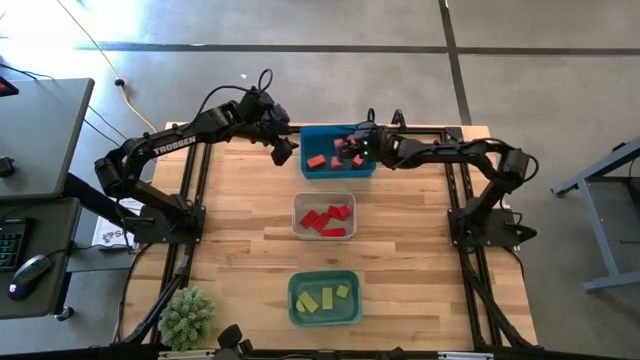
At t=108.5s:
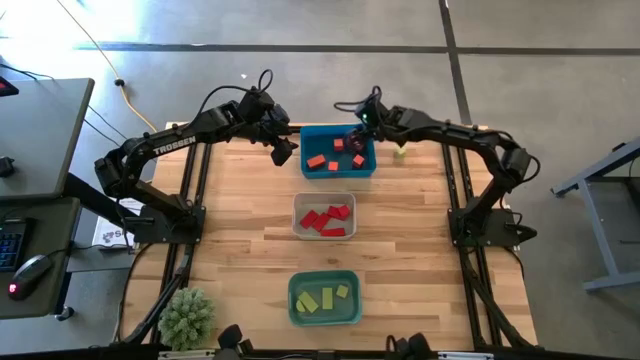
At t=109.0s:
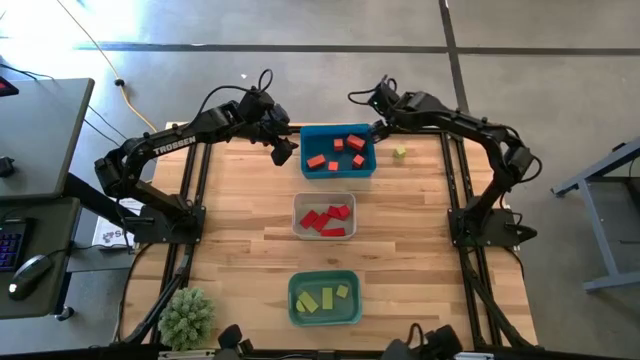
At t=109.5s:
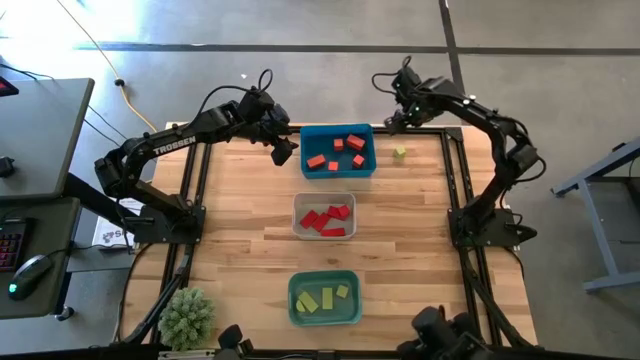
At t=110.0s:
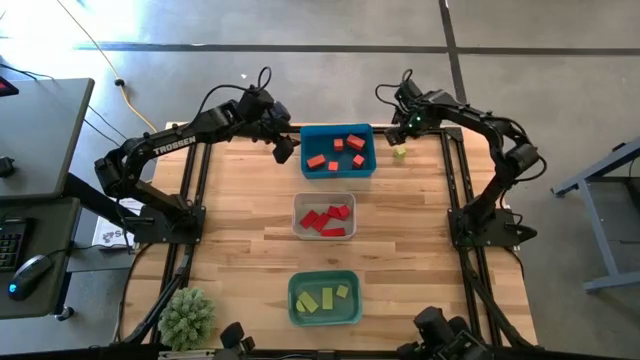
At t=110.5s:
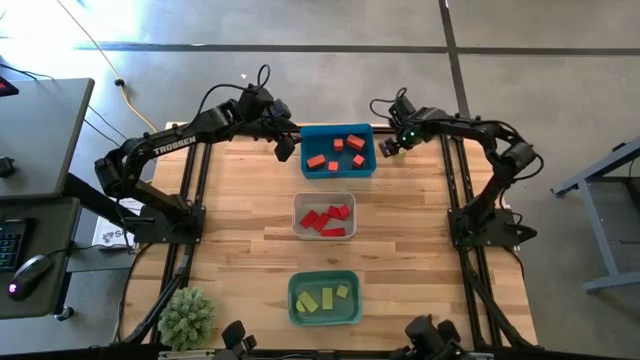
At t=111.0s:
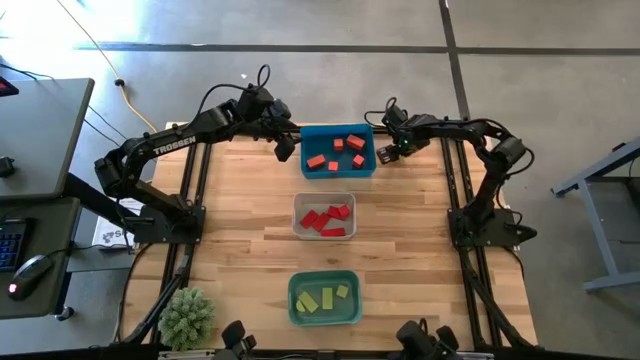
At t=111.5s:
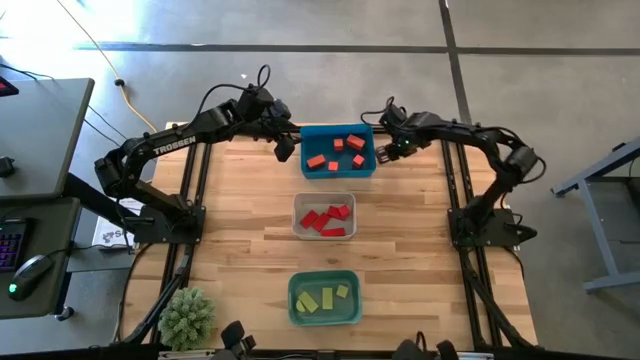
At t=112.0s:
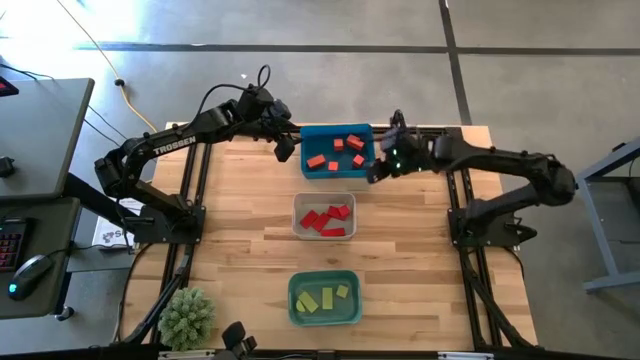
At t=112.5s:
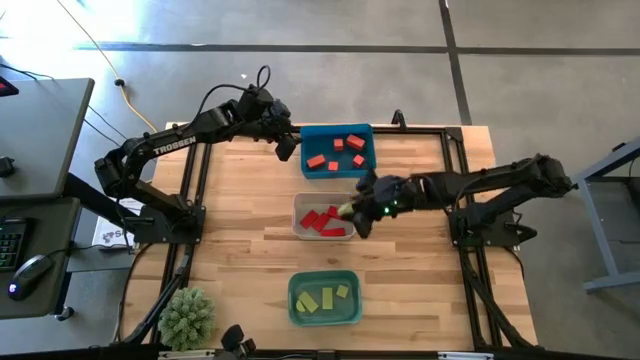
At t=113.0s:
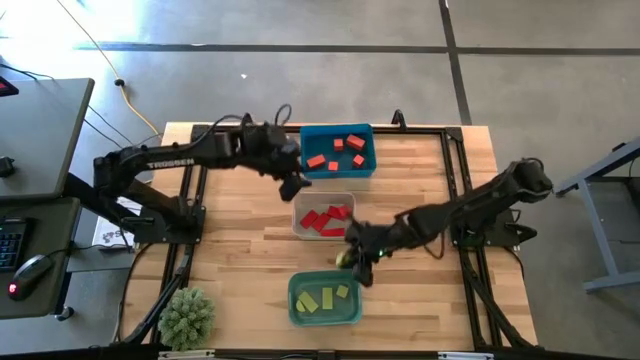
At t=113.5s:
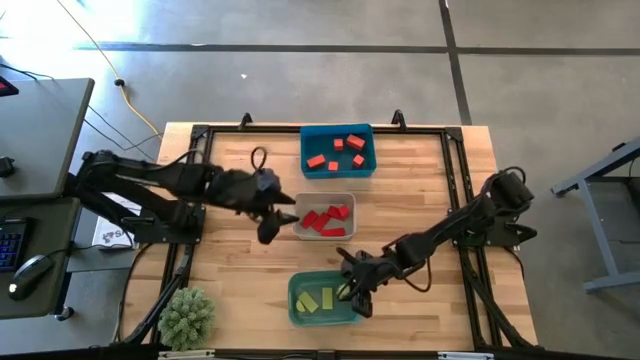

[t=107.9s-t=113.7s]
Task: Sort & place blocks by color
Put the light green block into the green bin

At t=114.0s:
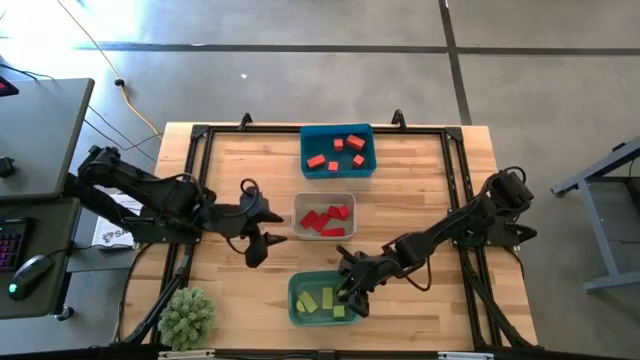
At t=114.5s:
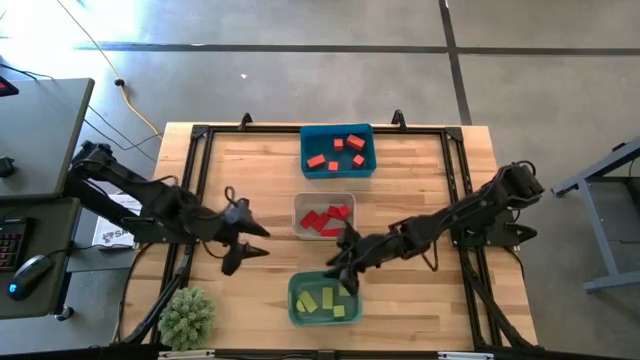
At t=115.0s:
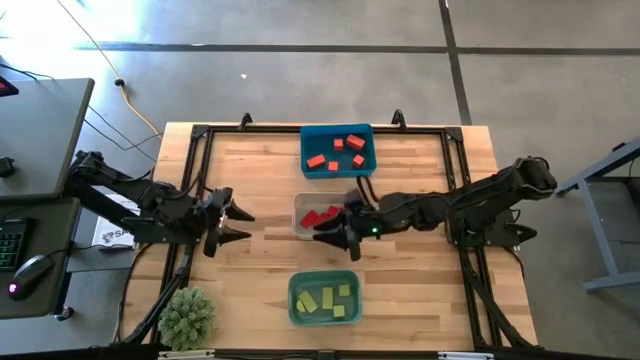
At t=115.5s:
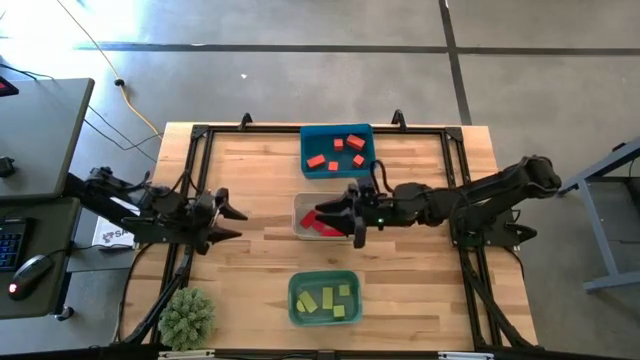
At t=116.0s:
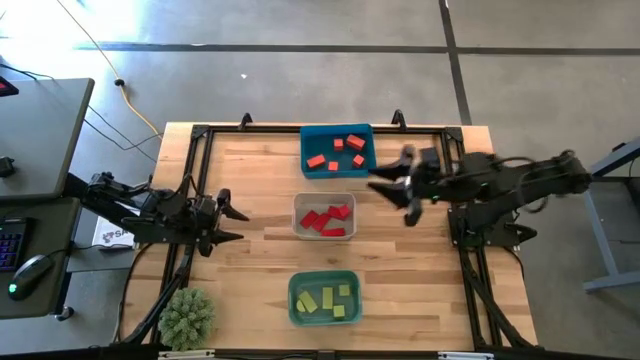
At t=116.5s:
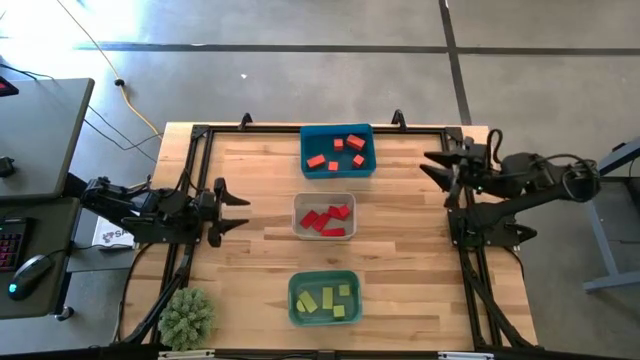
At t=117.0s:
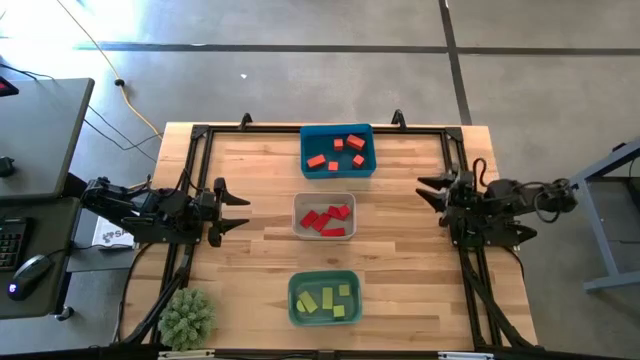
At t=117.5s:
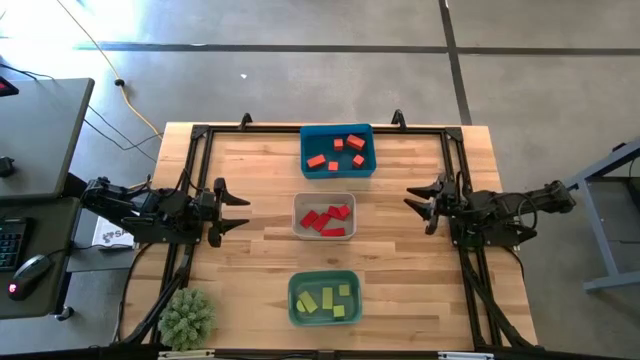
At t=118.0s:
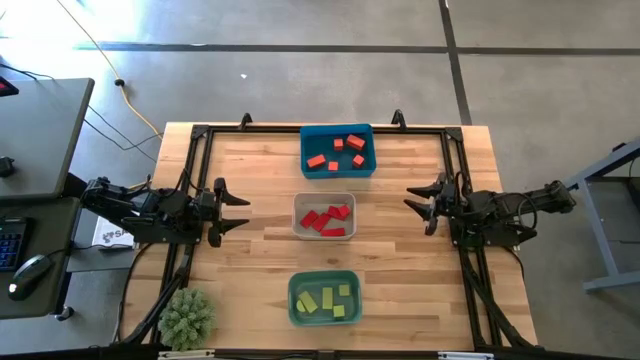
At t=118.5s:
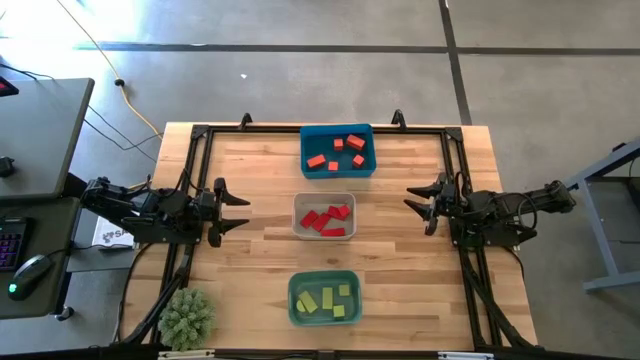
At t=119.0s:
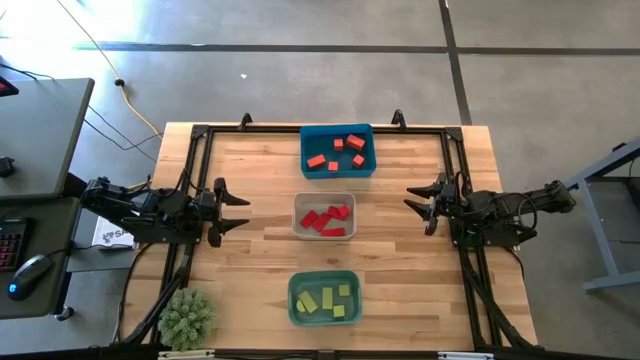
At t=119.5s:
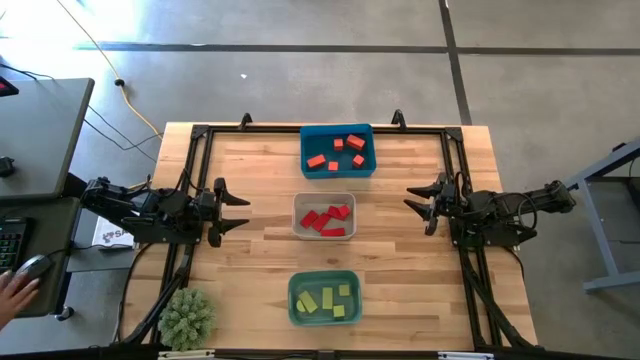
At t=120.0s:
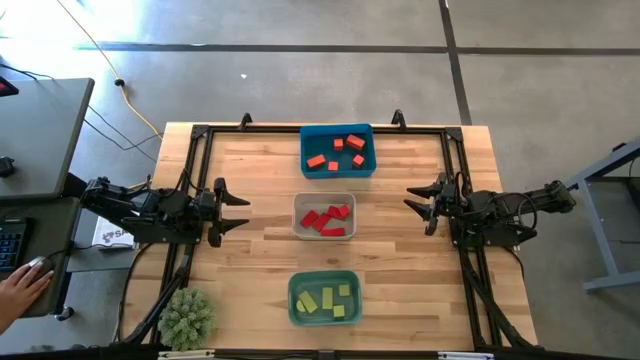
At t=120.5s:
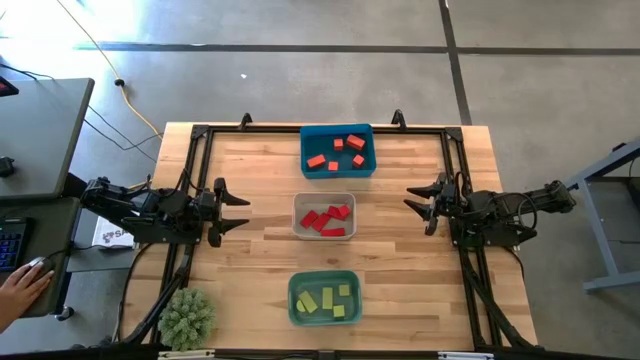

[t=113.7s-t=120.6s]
Return to Home Position

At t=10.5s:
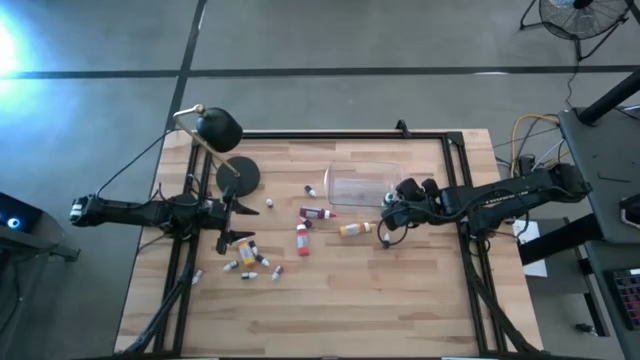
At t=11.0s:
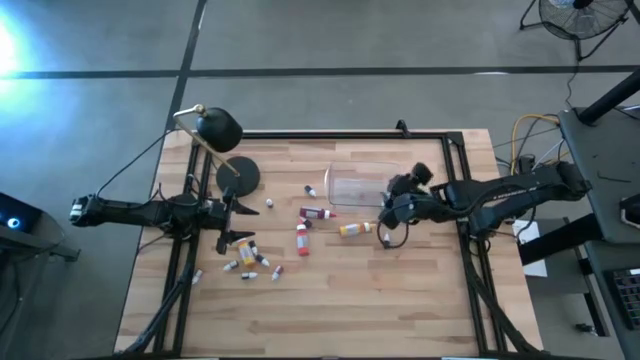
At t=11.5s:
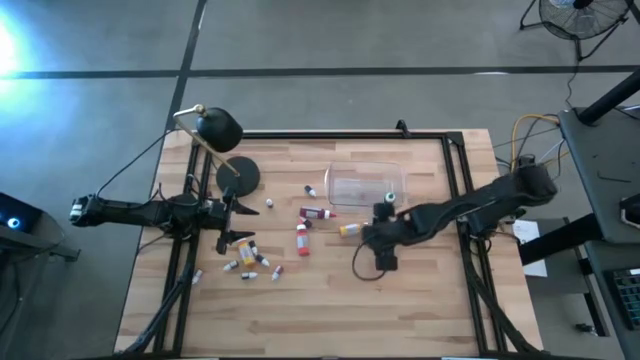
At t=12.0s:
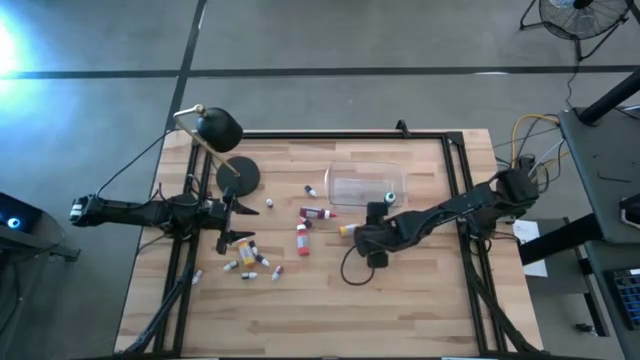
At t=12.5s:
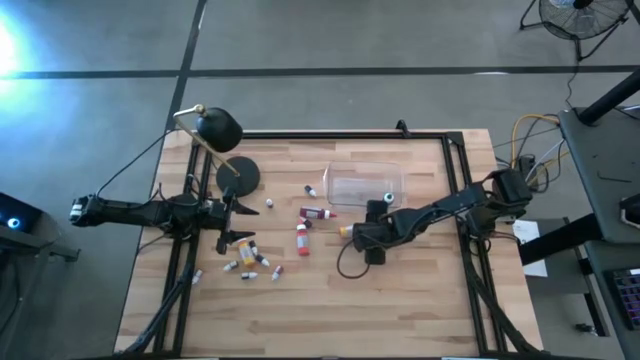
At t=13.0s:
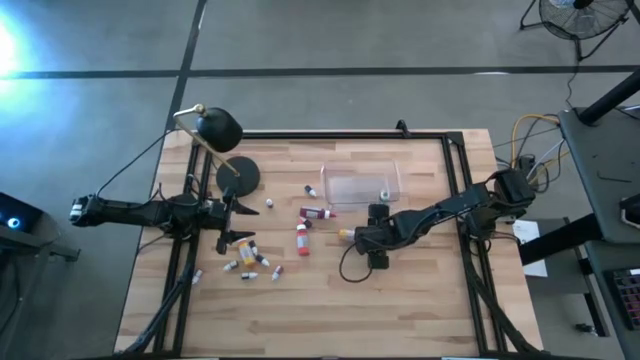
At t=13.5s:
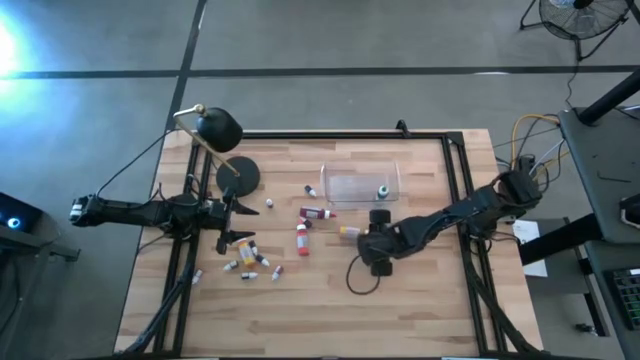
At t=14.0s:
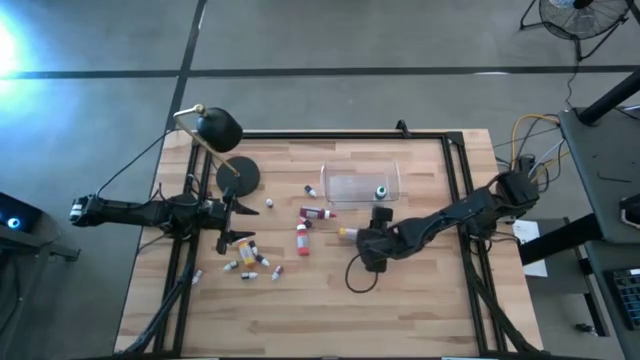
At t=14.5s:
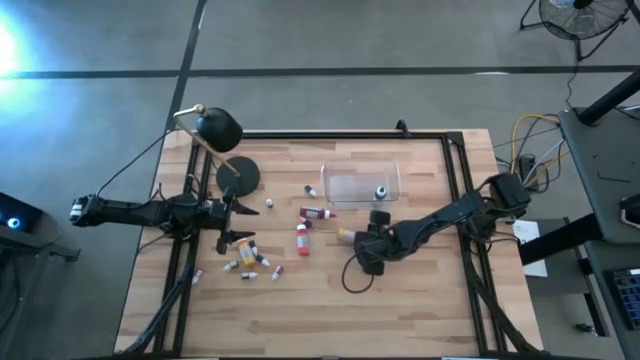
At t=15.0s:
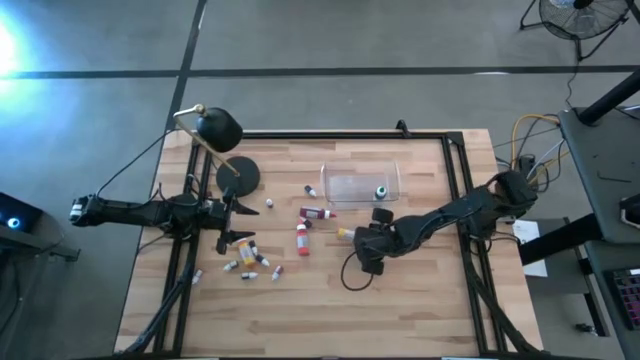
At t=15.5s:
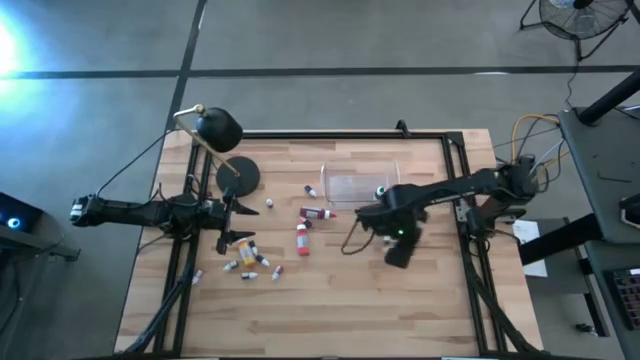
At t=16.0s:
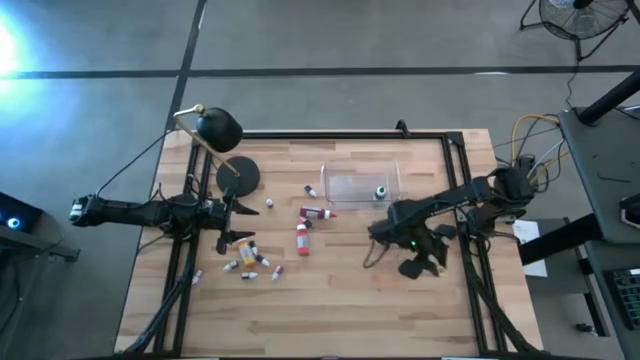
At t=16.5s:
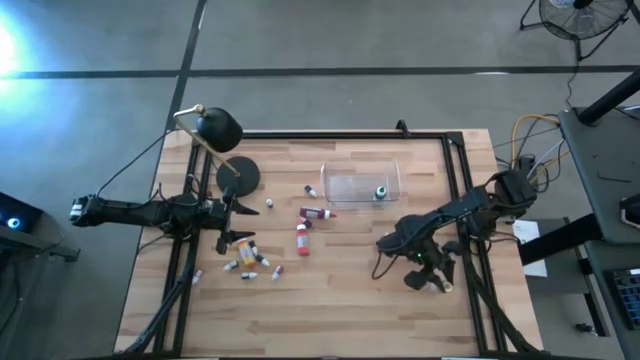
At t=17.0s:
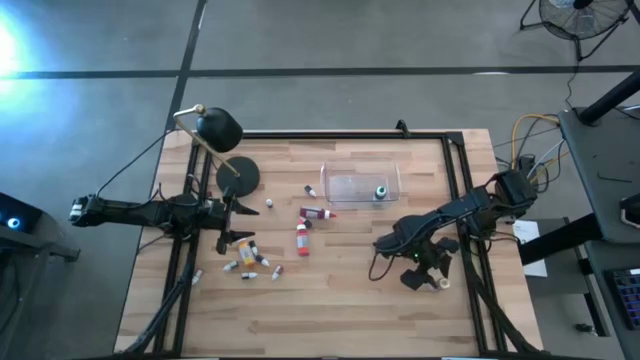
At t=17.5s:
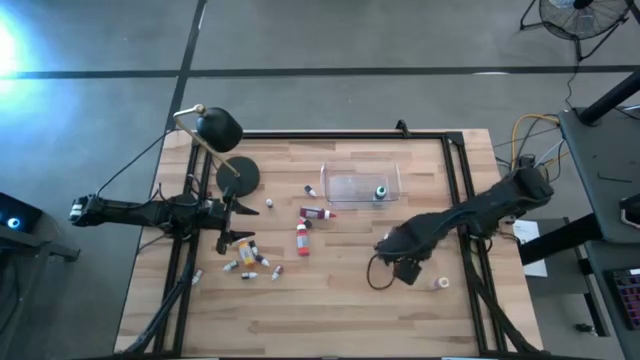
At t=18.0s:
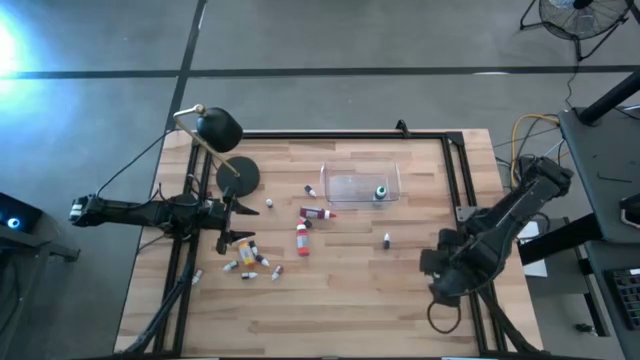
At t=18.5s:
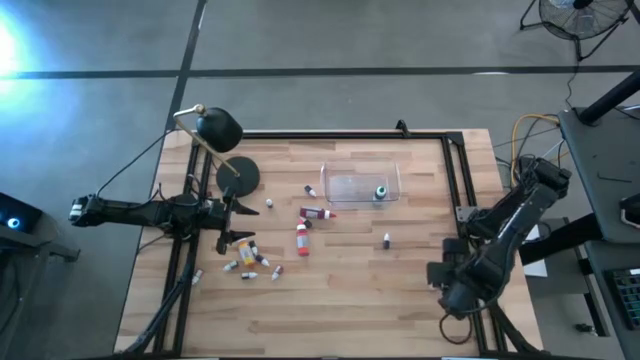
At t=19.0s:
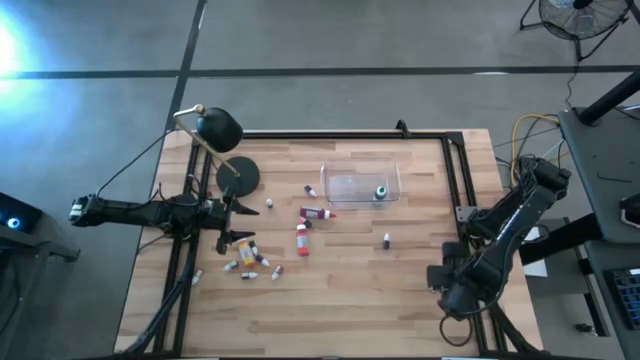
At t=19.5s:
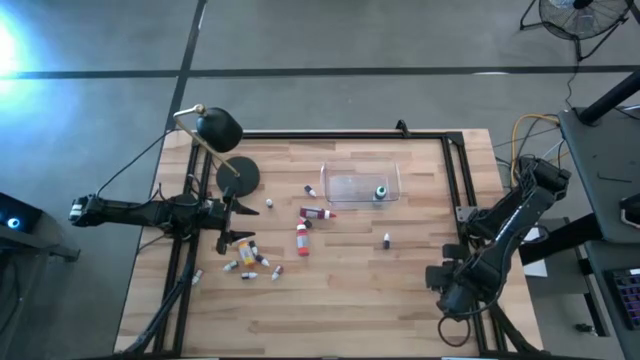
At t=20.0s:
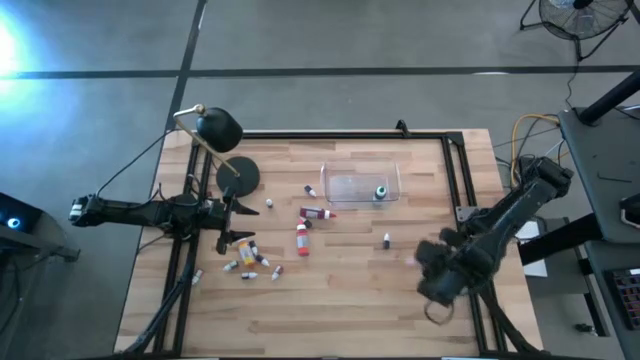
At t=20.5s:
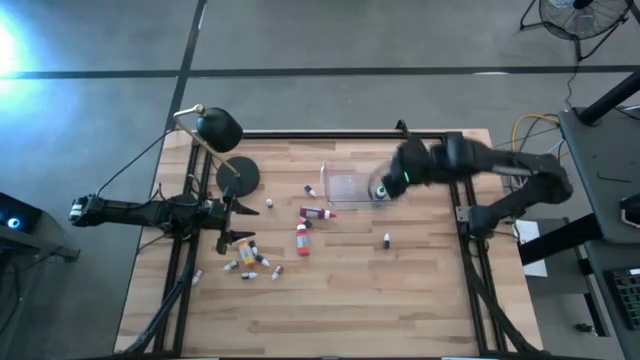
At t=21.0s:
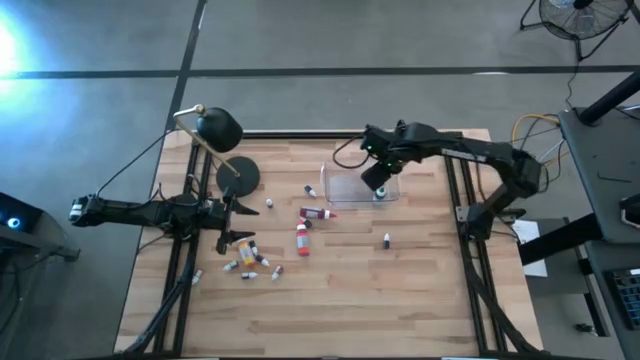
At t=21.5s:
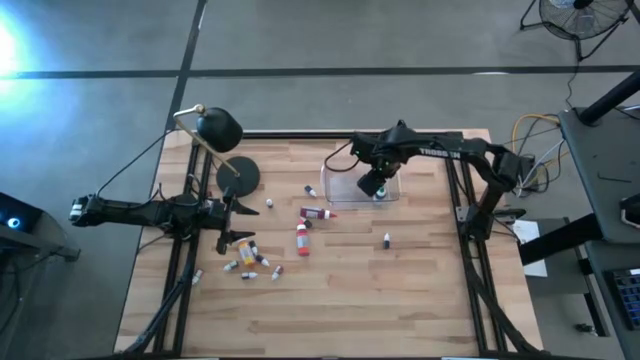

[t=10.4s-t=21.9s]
Task: Pick & Place food coloring
Put the large right yellow food coloring bottle into the transparent bin
